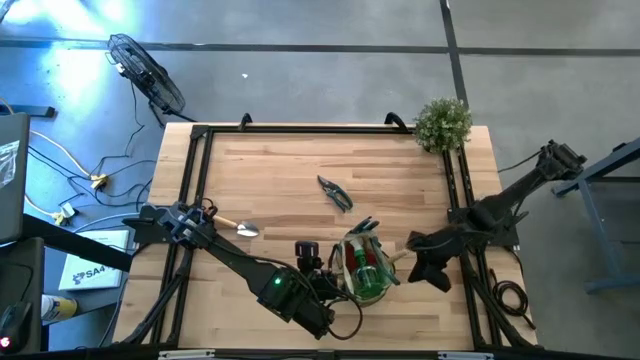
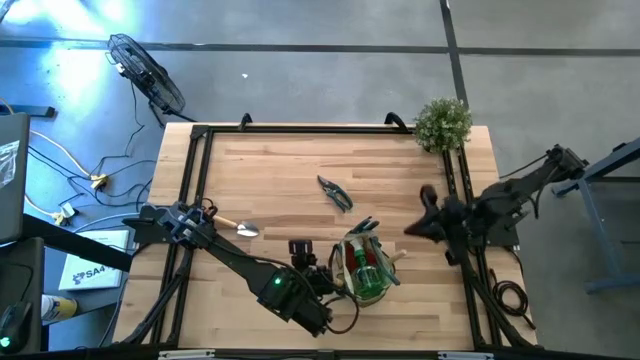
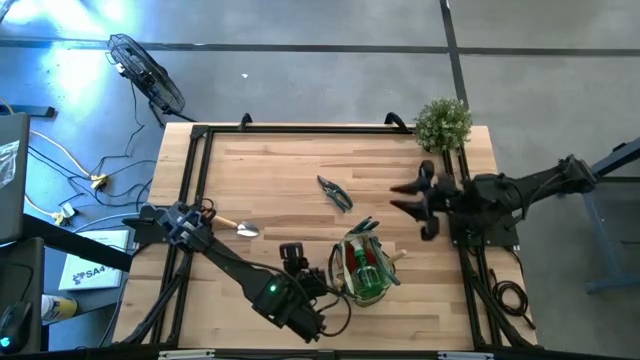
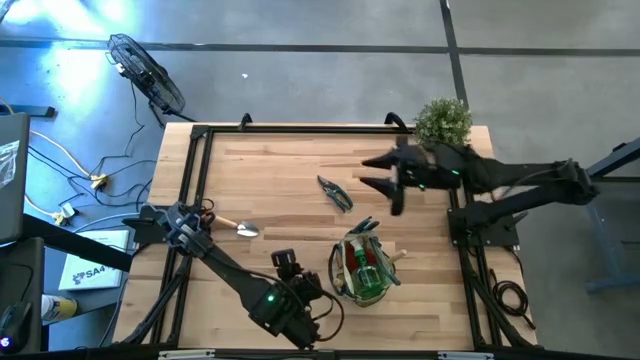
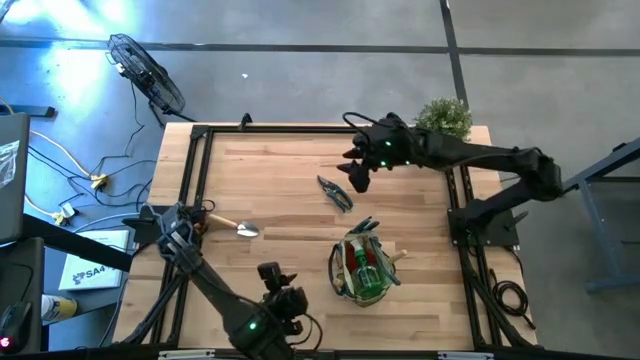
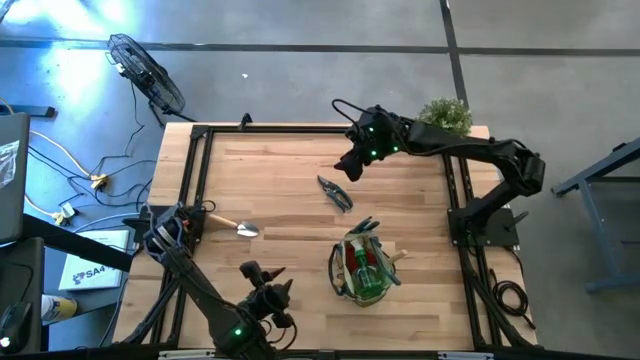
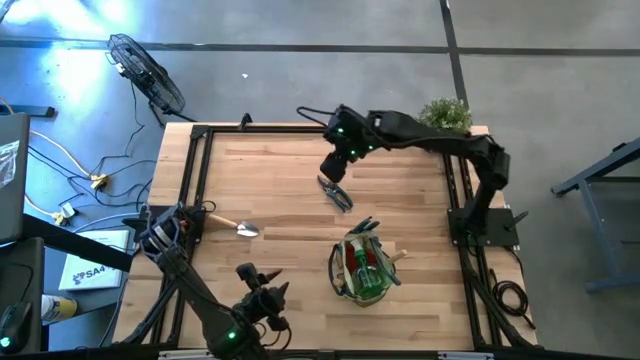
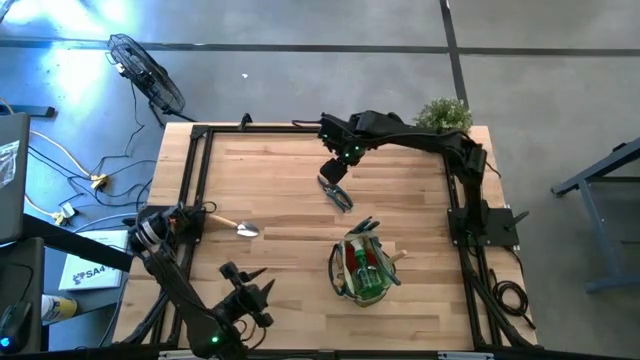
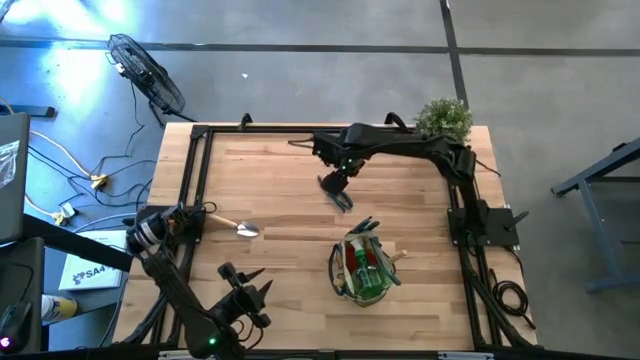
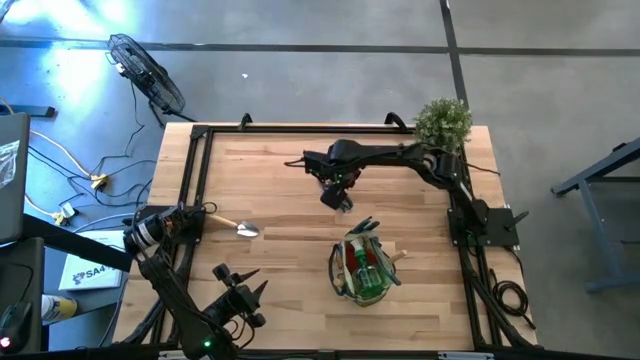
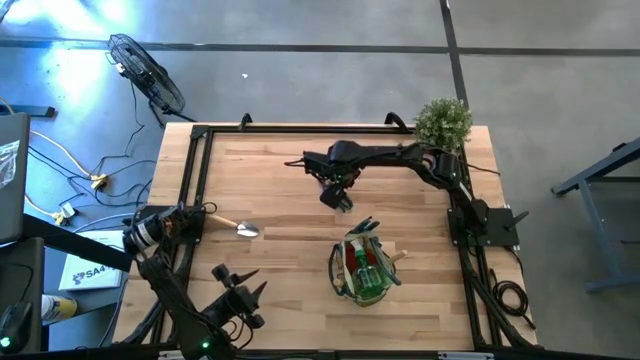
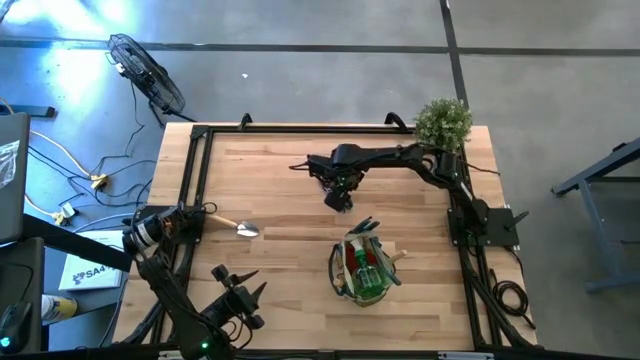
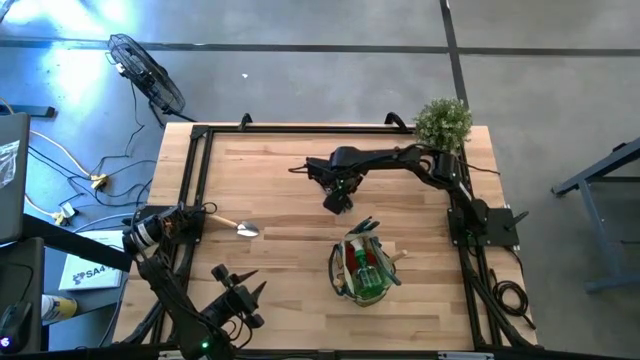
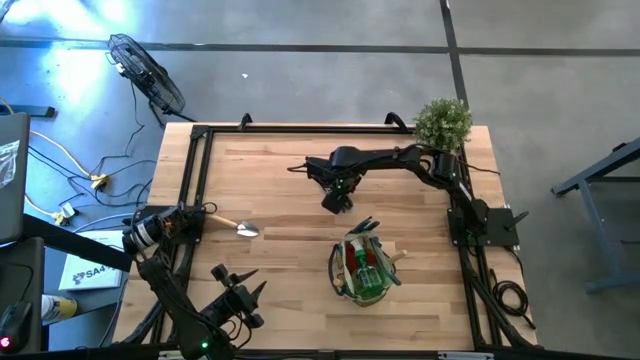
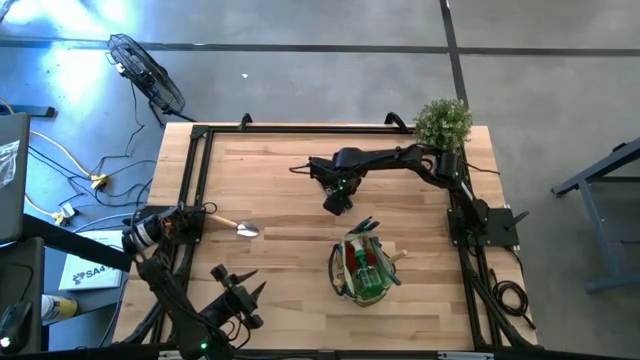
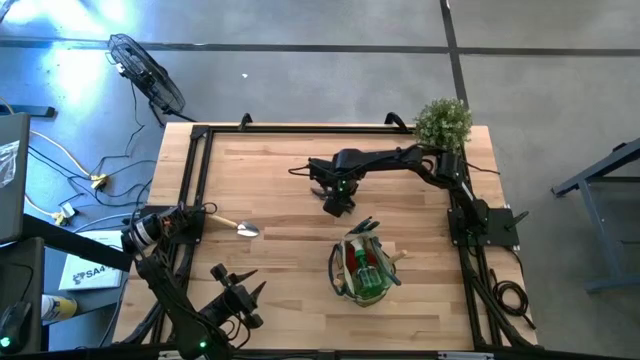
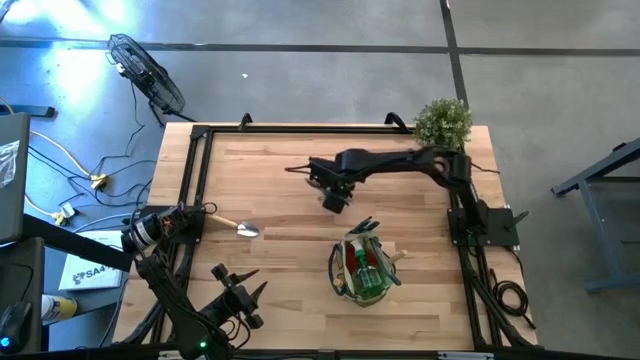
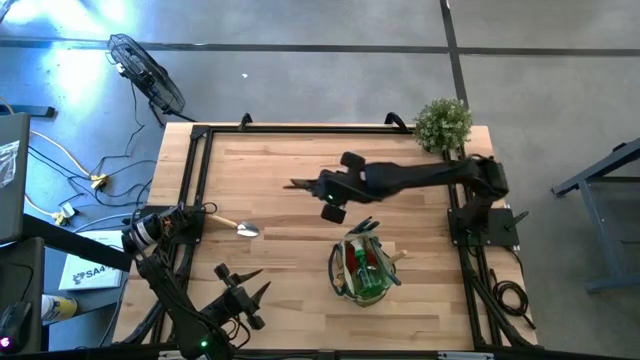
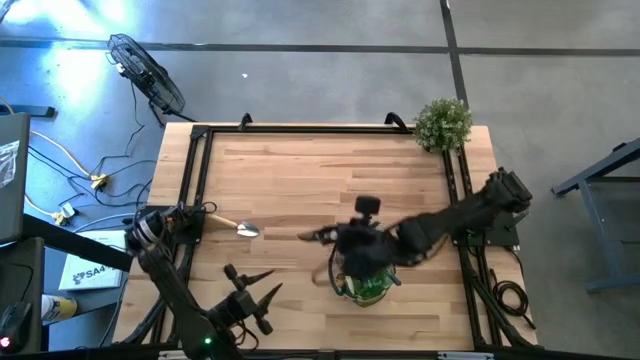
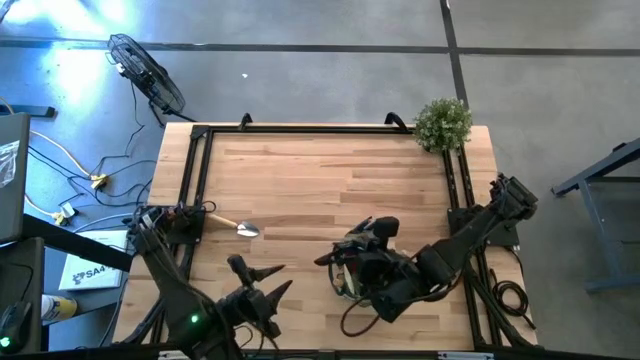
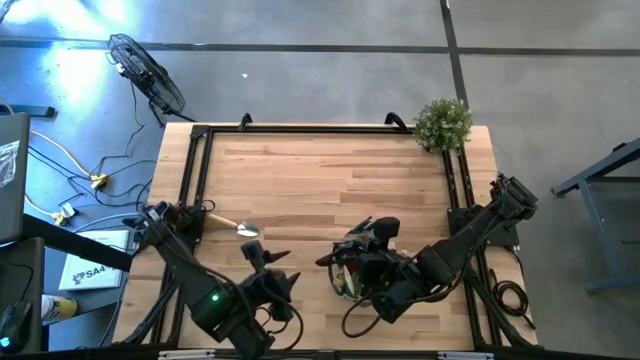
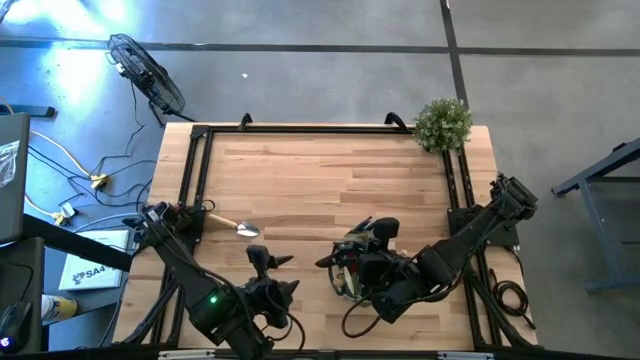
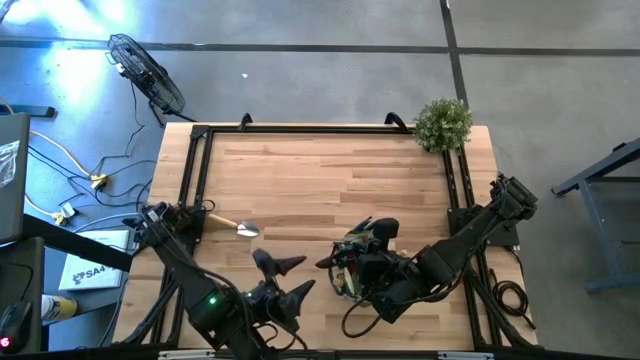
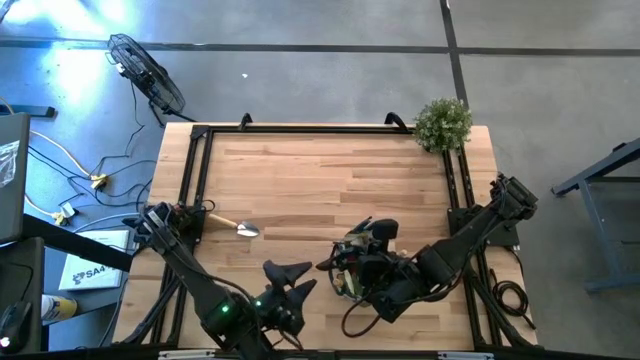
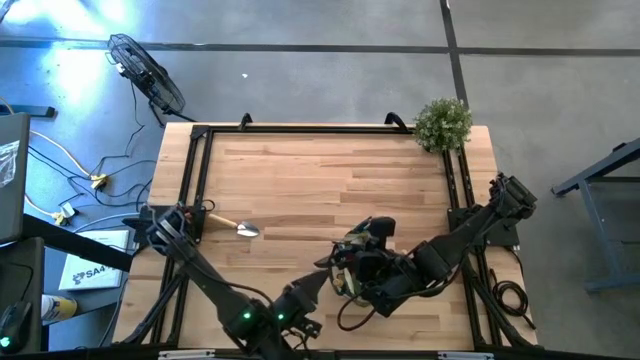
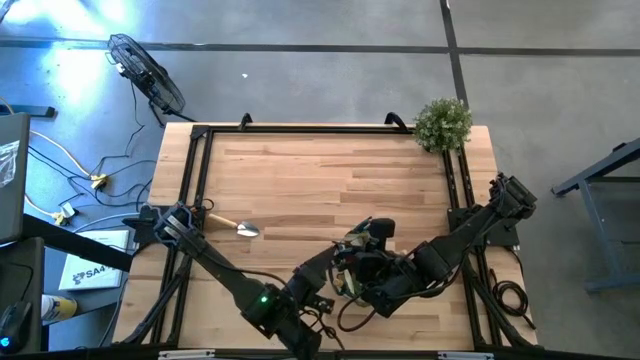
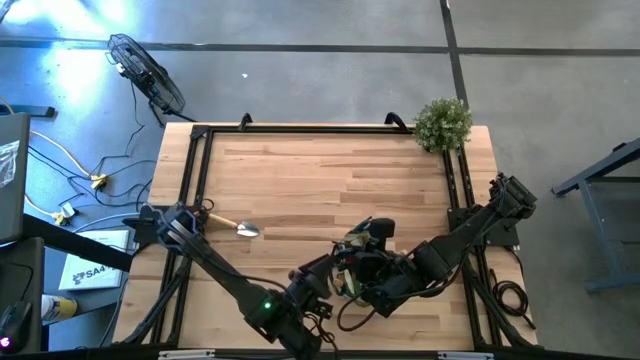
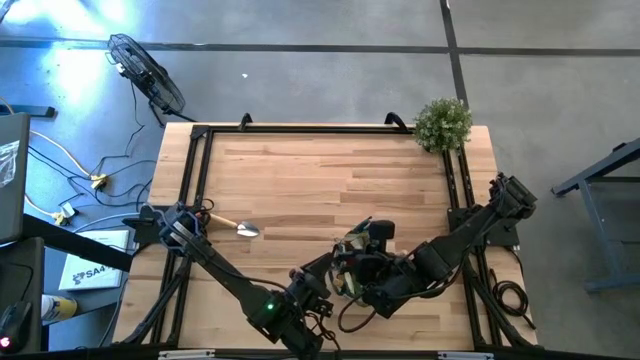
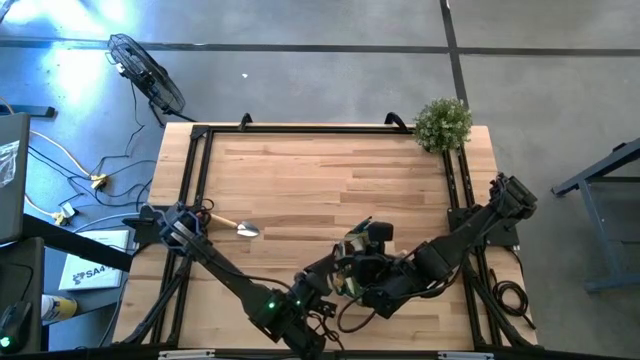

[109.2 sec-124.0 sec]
Task: Pick & Place Garden tools in Gardening bag
Put the green shear scissors into the gardening bag

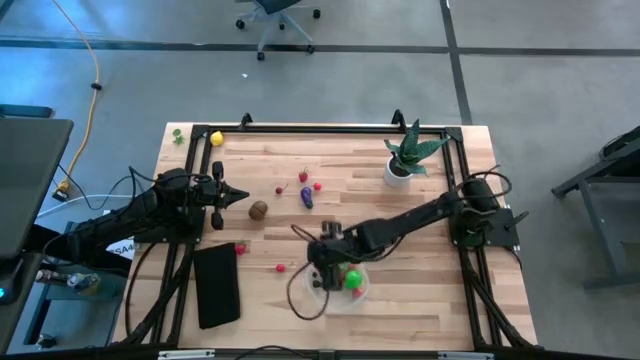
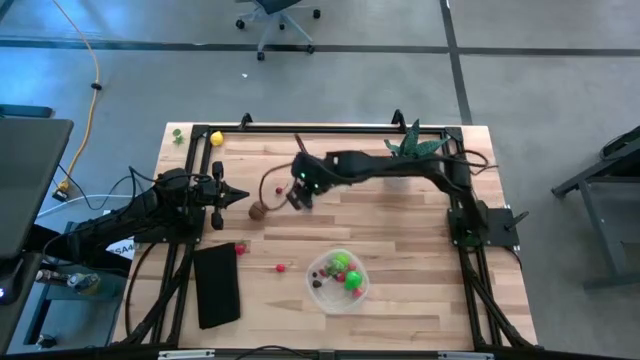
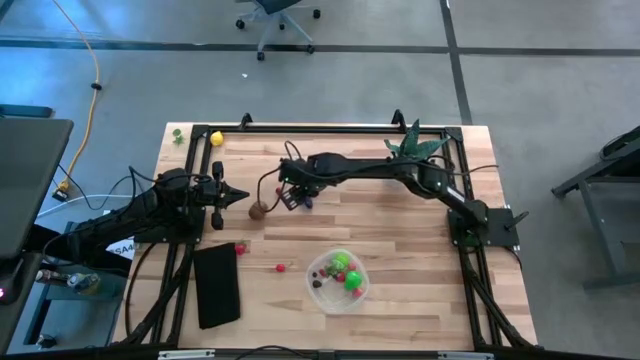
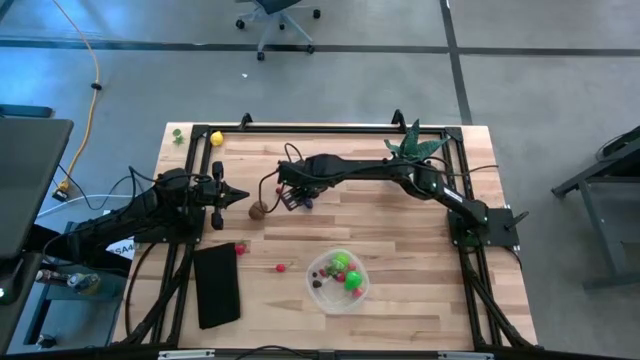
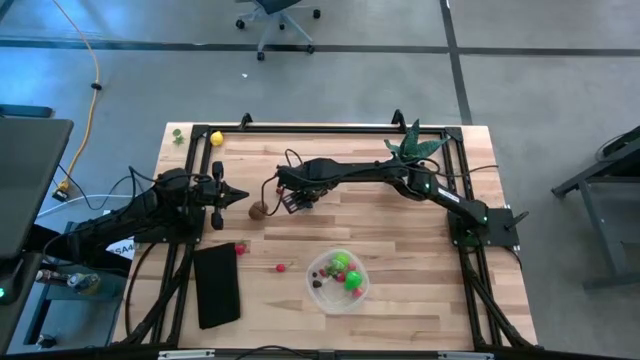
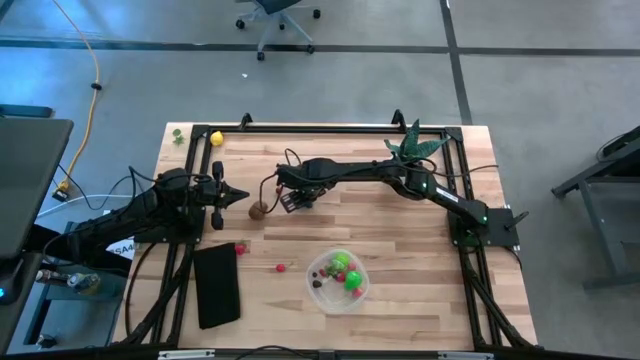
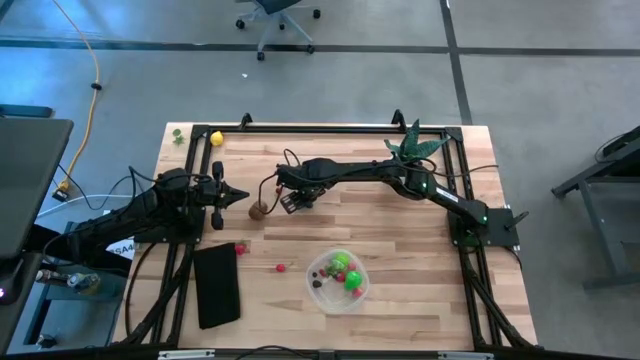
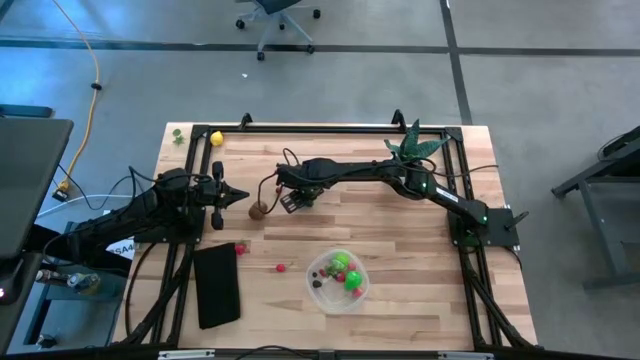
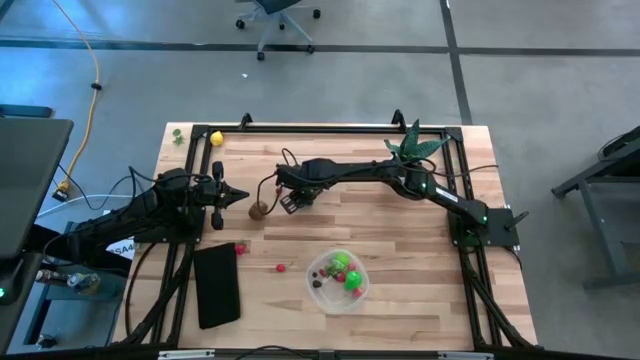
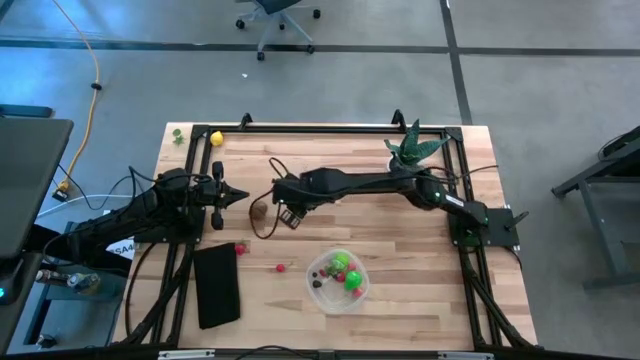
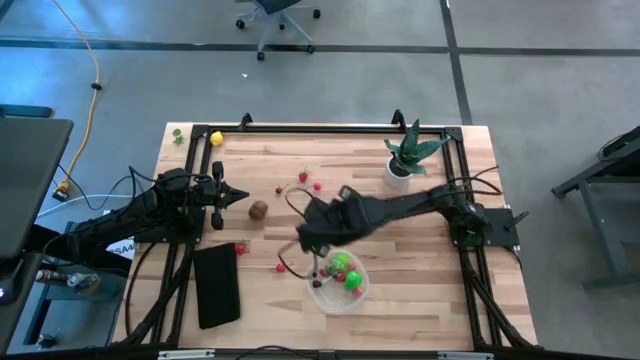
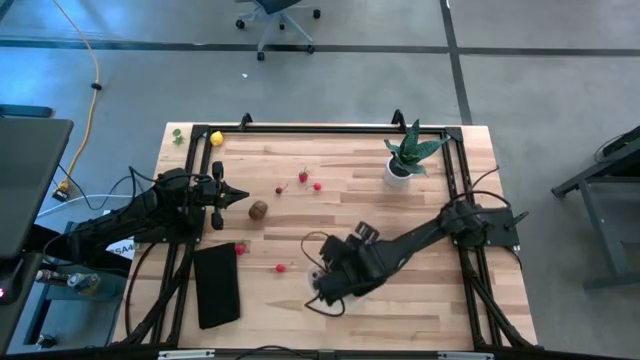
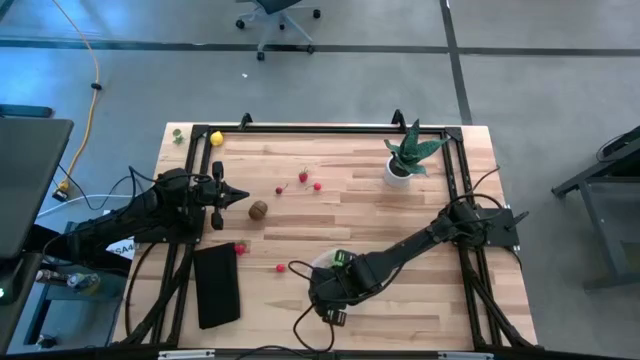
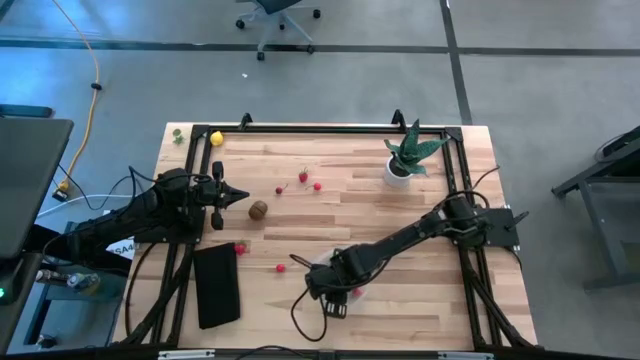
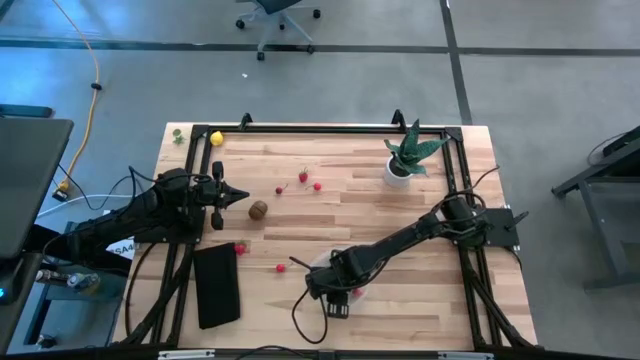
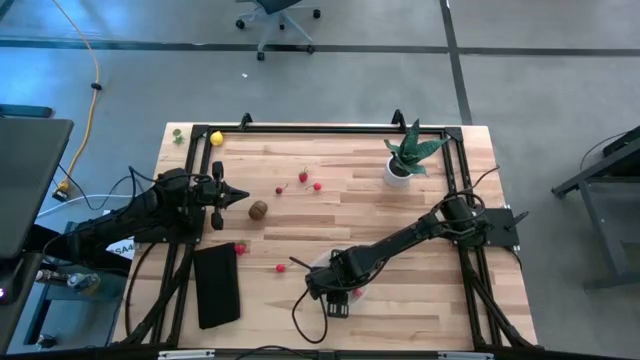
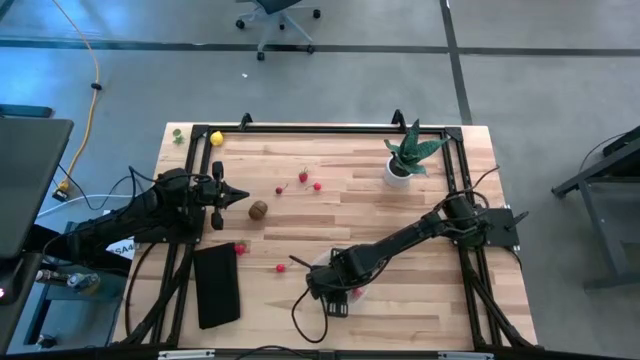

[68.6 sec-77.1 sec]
Task: Pick and placing Produce into tupperware
Put the violet eggplant into the transparent container
